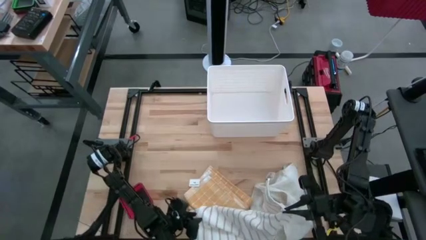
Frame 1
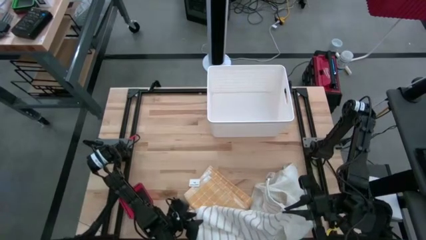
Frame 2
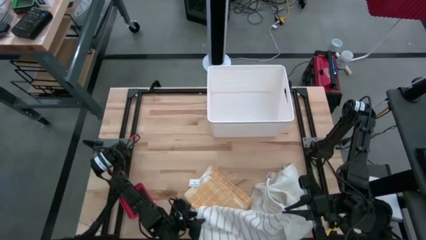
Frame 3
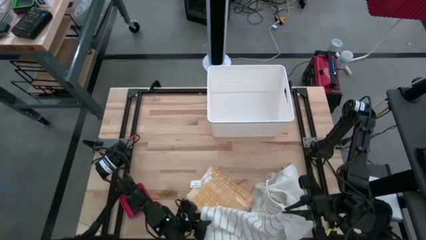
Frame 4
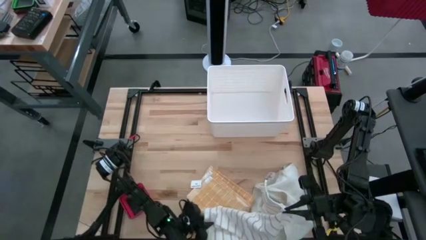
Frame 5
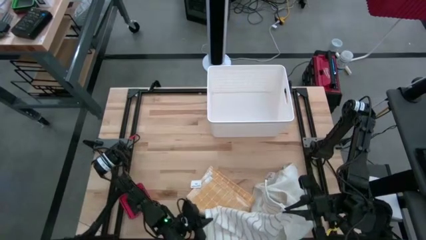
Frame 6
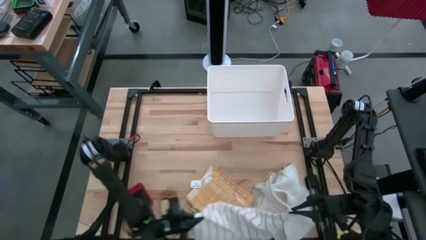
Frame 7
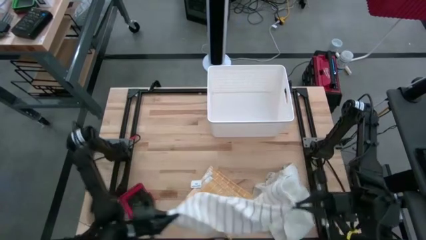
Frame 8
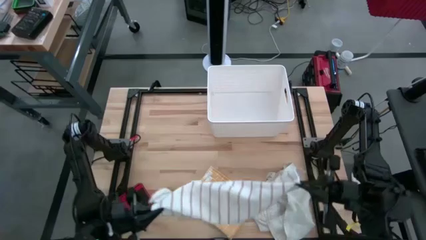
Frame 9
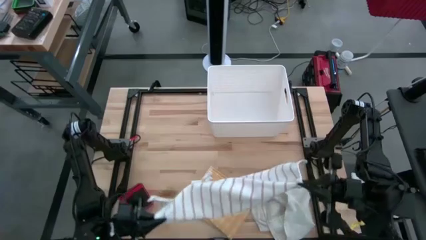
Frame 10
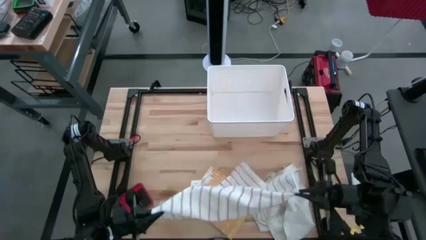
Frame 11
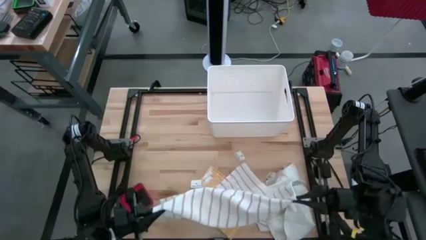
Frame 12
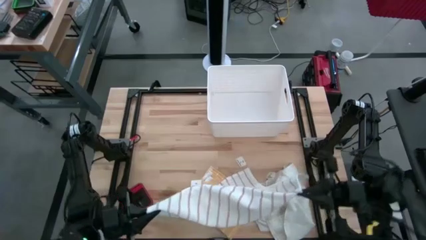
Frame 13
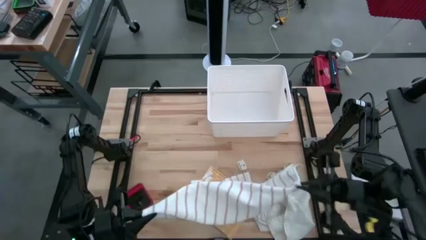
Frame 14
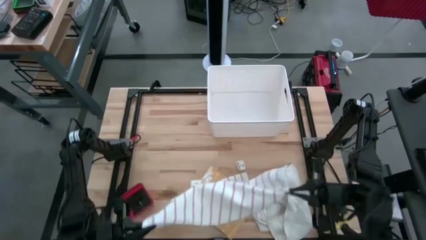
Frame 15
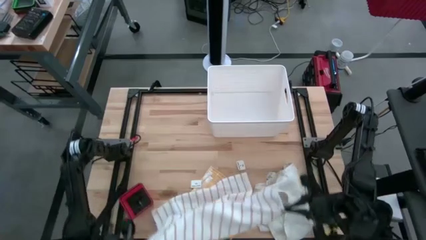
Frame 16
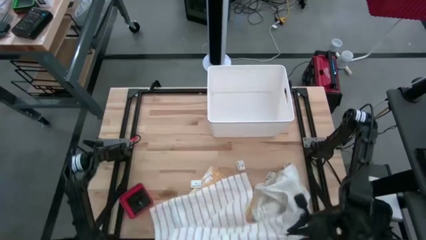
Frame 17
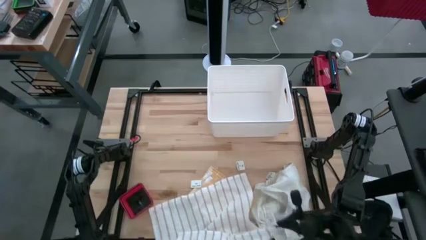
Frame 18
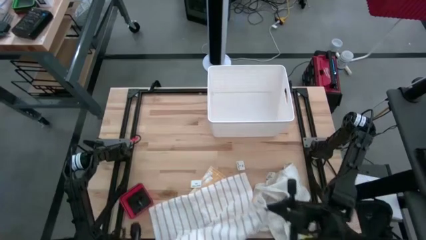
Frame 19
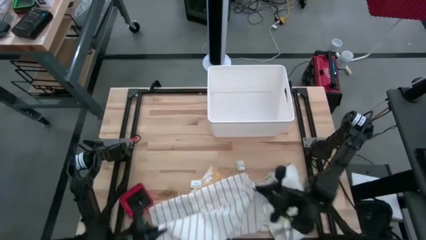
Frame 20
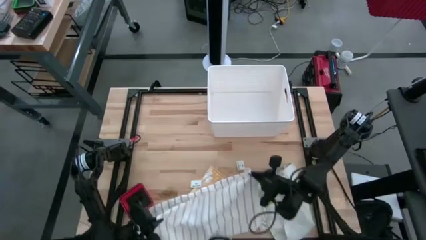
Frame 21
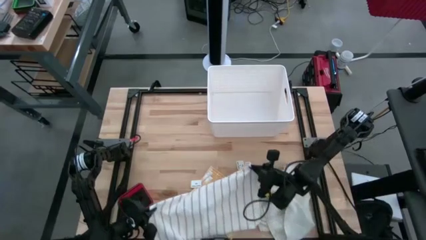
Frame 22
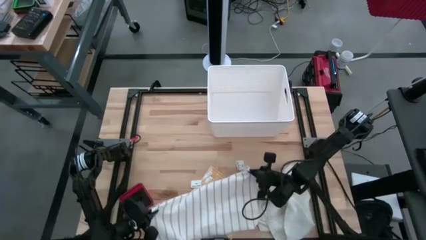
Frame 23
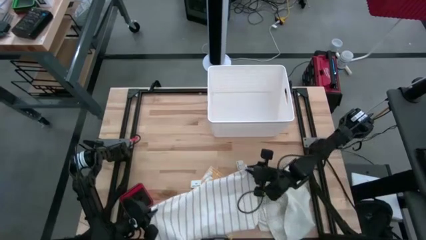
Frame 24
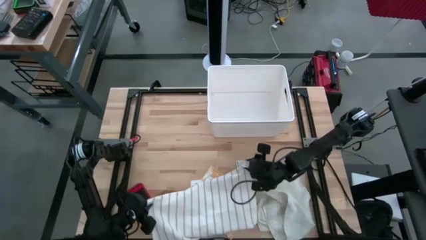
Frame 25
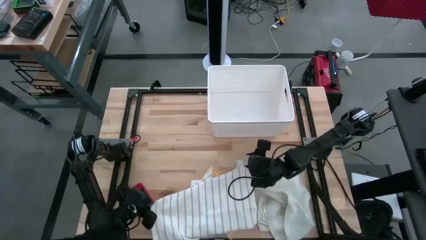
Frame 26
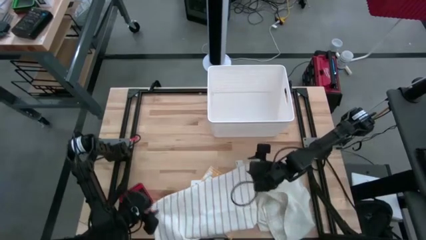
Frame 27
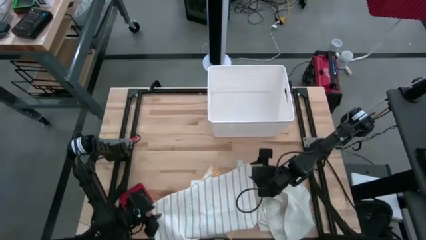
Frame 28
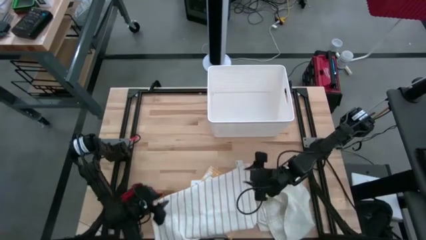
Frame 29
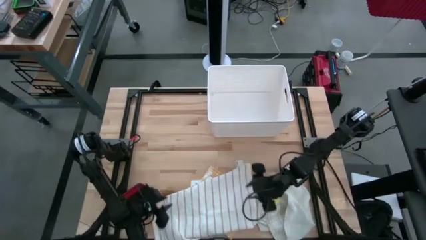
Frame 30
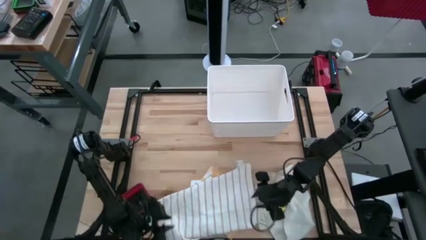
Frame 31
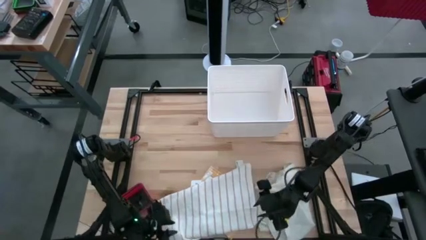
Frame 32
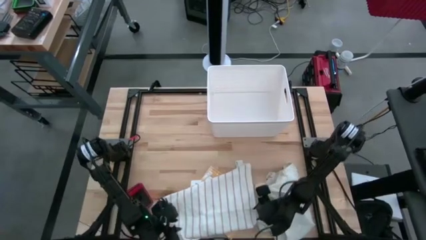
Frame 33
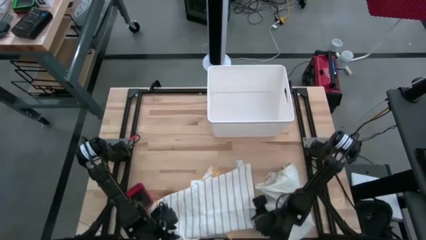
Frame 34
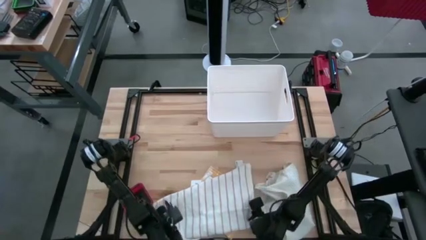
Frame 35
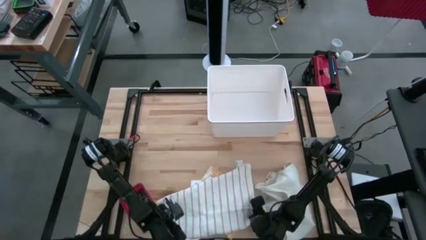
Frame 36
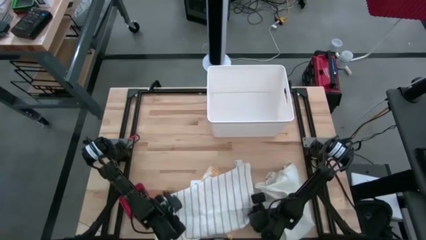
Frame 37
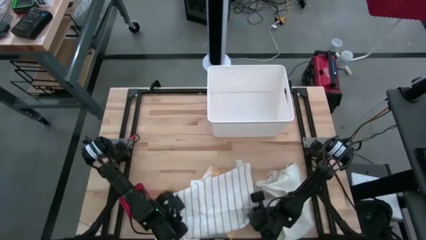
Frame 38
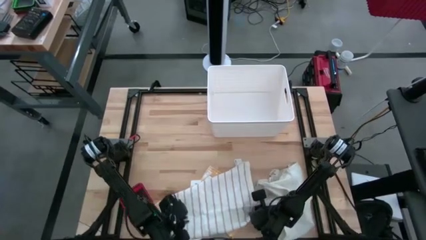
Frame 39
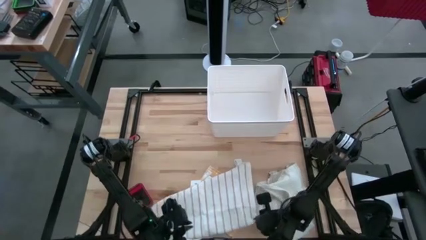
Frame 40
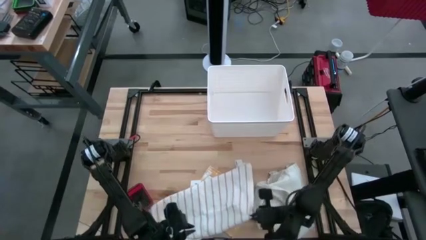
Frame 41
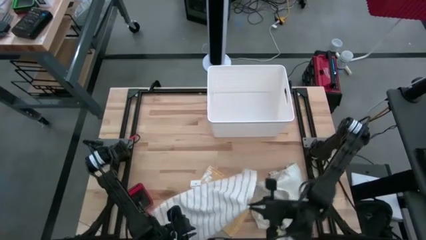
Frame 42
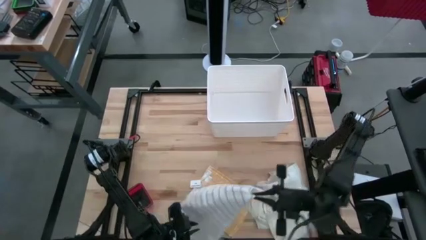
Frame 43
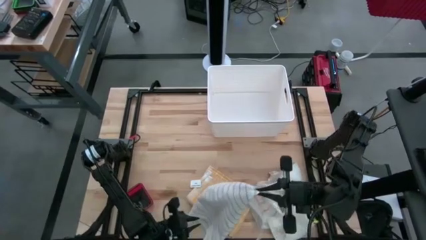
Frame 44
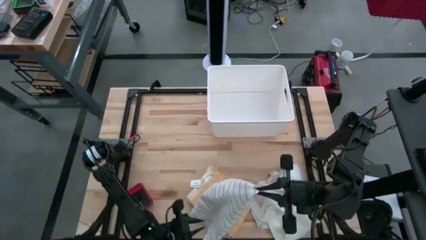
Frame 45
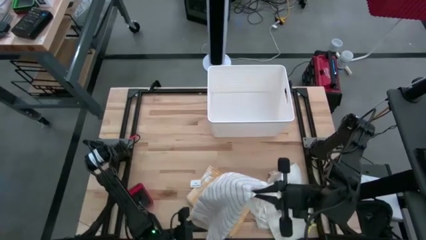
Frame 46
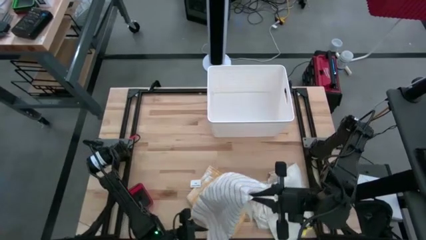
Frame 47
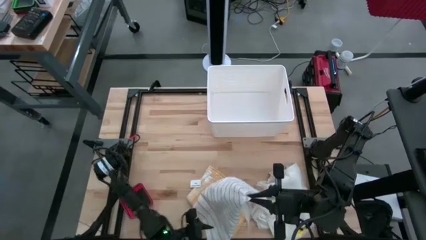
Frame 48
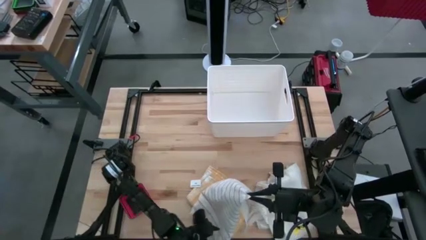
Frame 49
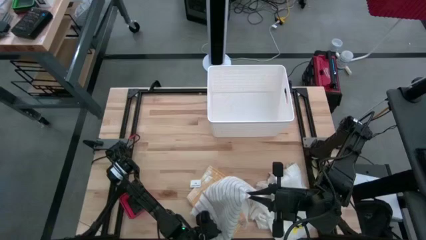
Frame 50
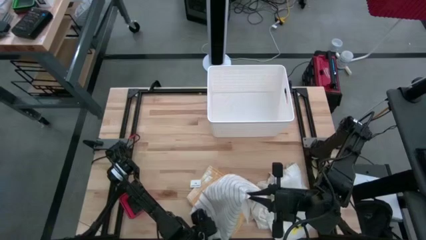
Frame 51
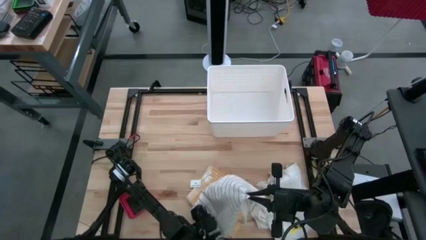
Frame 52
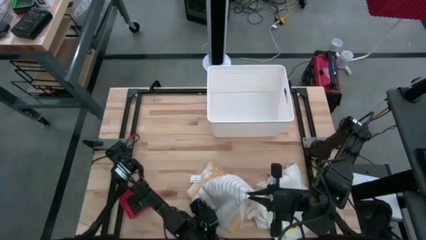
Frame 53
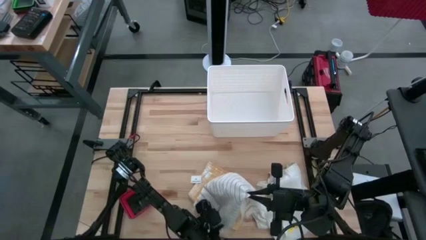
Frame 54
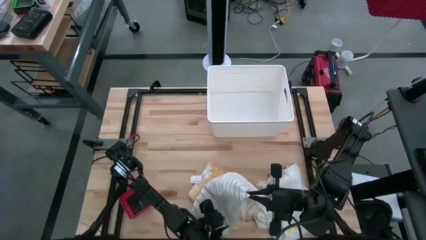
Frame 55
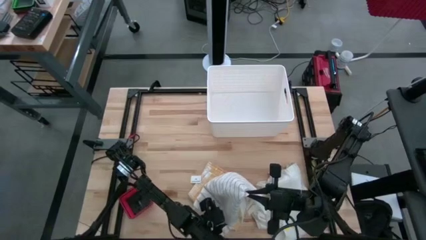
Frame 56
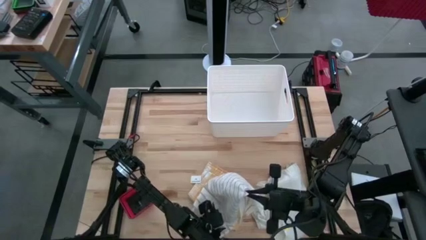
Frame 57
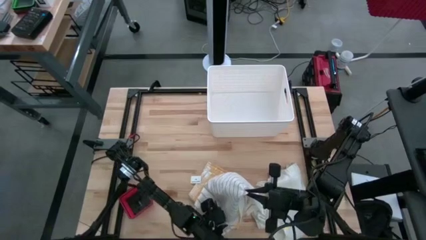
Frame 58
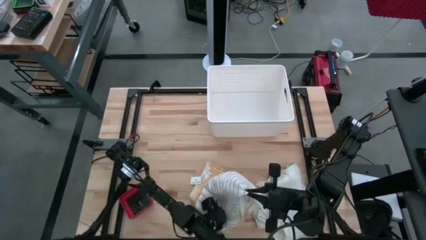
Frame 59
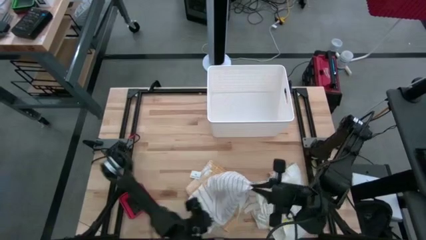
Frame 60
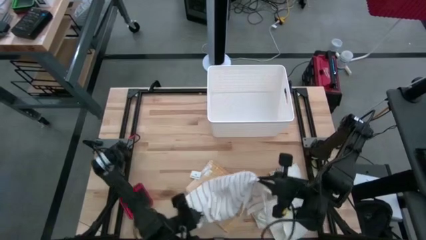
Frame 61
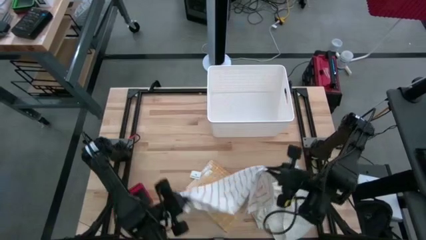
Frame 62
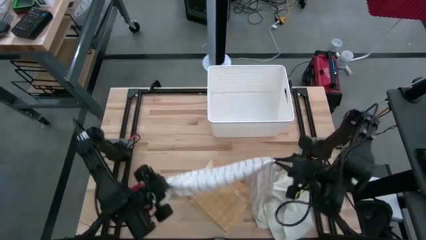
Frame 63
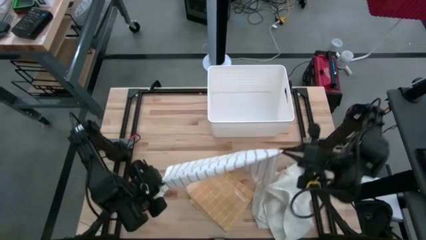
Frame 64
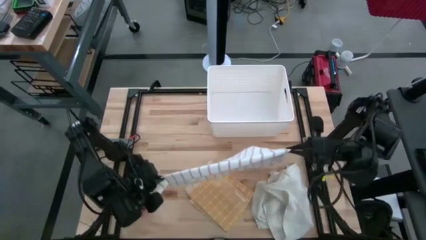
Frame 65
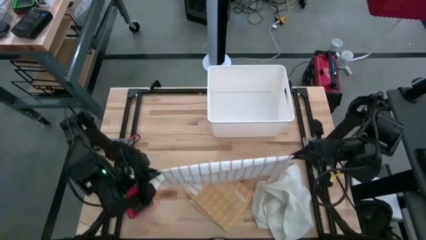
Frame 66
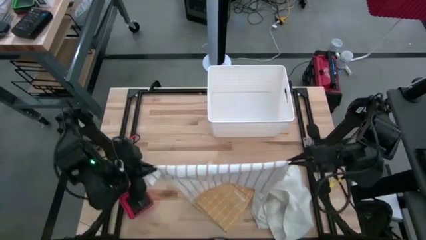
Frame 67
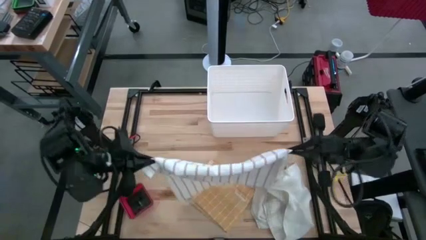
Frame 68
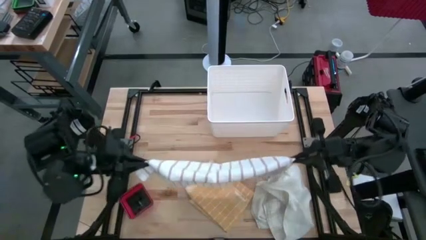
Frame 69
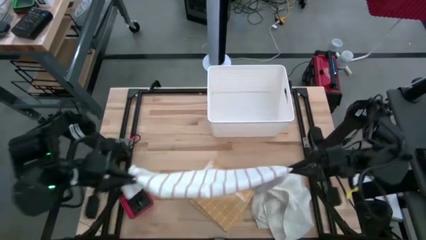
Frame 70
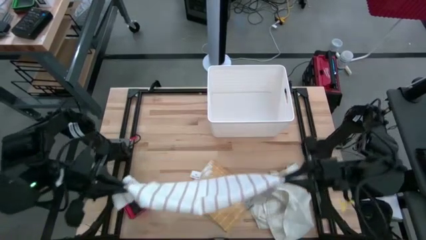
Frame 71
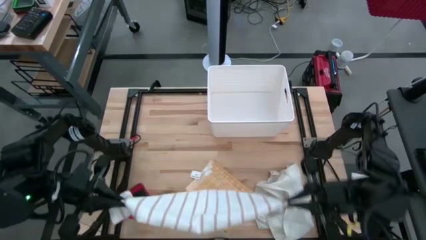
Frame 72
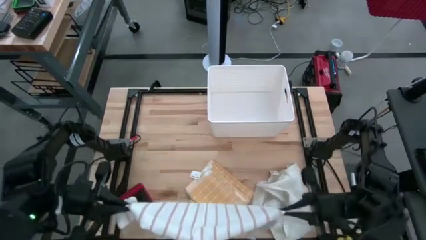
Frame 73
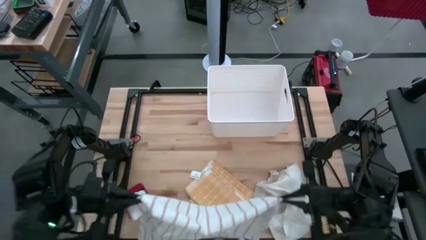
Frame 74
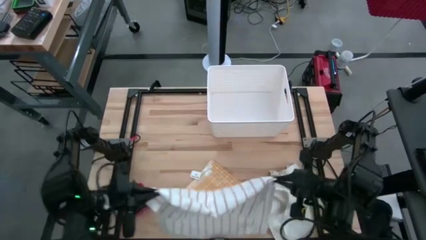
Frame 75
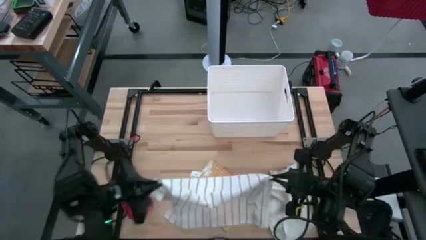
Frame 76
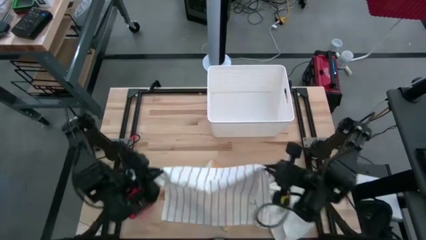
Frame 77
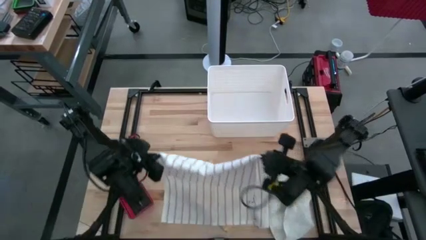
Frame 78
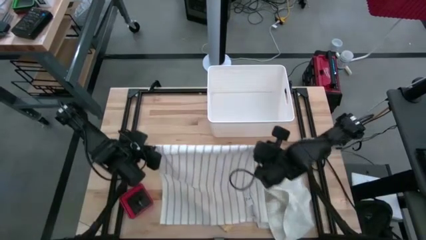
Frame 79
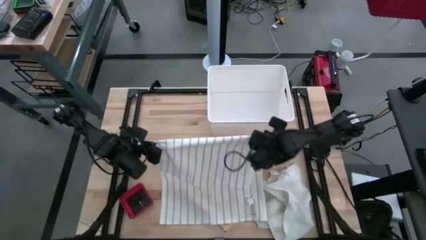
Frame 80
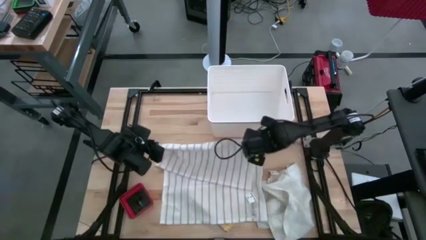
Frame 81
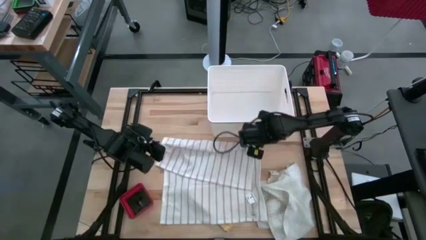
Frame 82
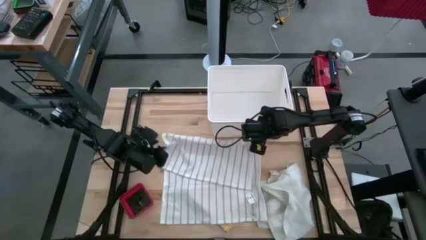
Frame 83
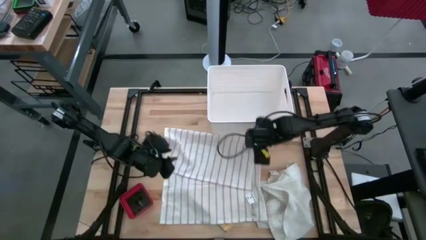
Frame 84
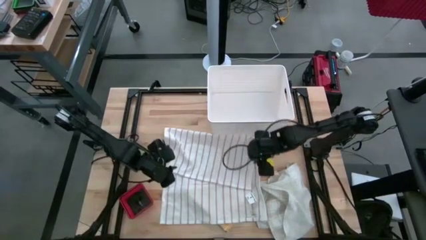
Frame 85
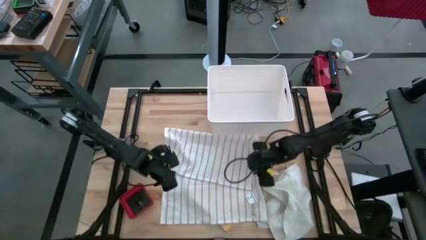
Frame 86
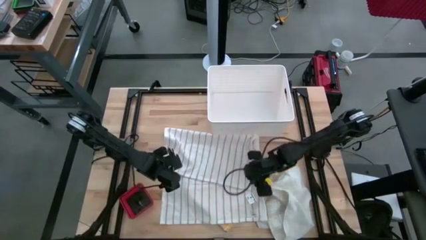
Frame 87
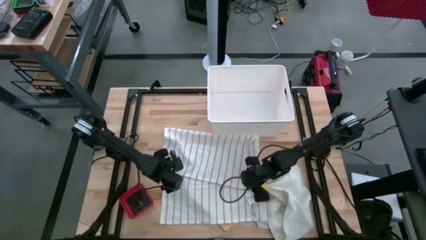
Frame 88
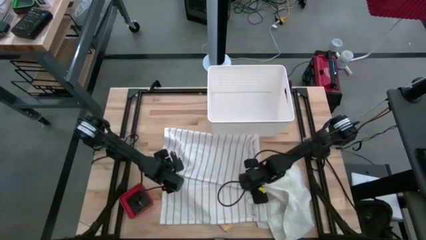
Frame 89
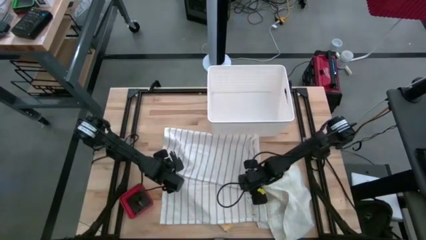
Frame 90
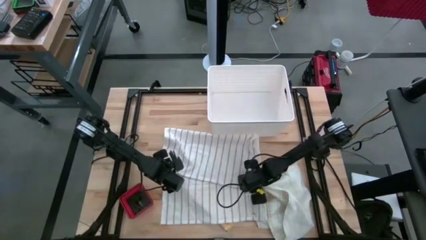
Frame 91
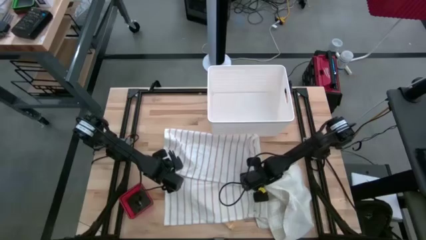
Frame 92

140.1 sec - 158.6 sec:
Task: Fold towel
Fold the brown patterned towel
